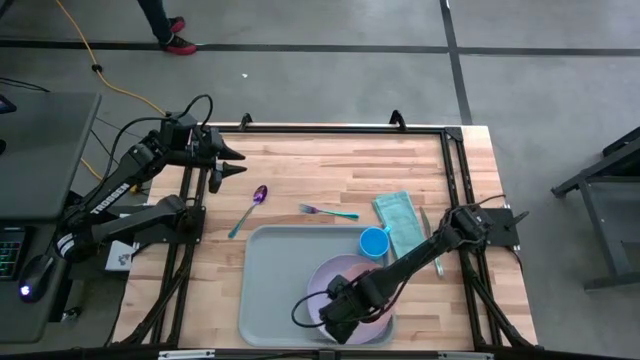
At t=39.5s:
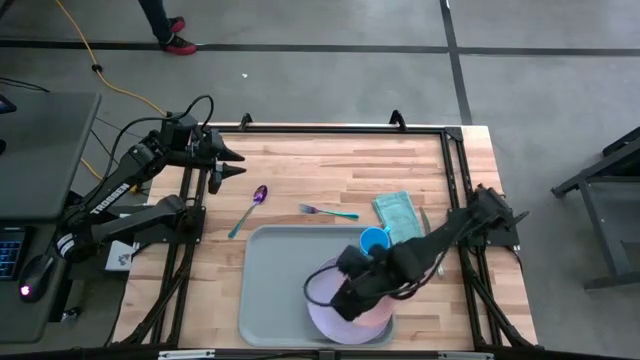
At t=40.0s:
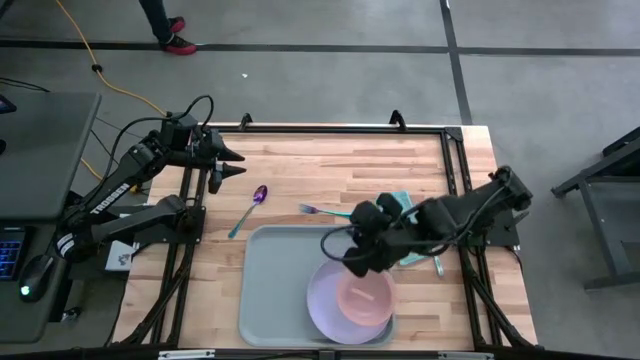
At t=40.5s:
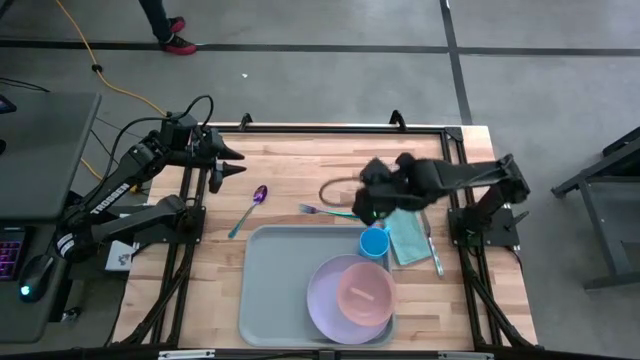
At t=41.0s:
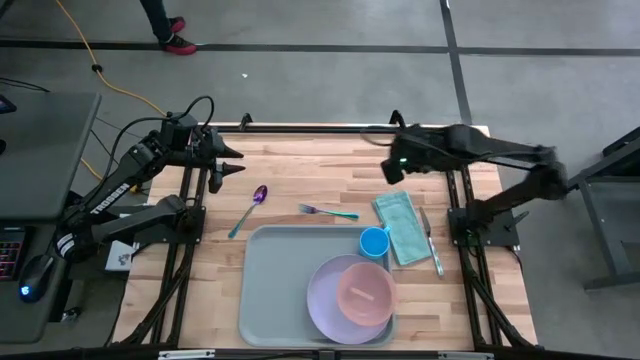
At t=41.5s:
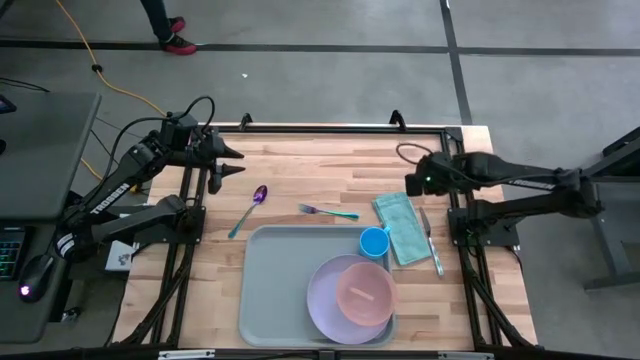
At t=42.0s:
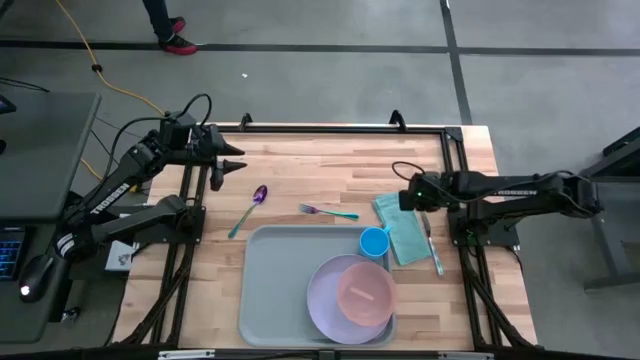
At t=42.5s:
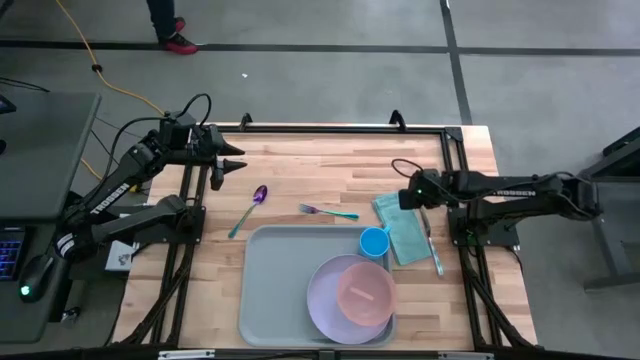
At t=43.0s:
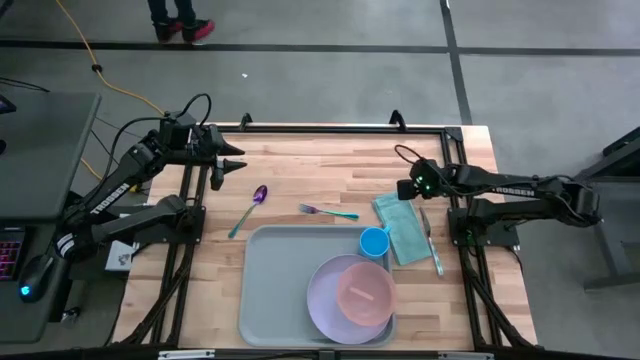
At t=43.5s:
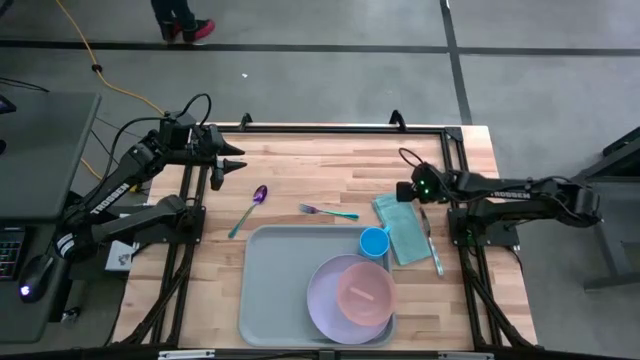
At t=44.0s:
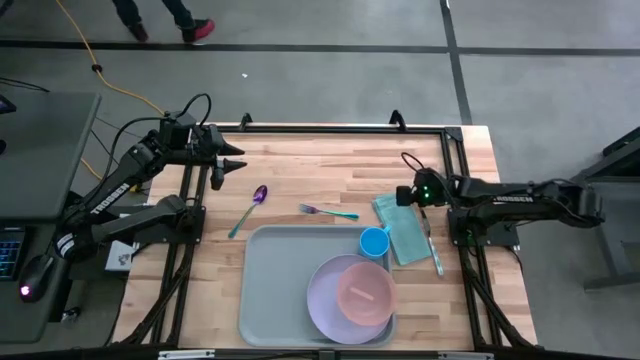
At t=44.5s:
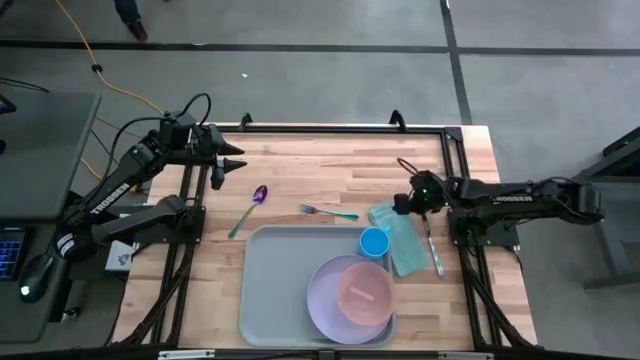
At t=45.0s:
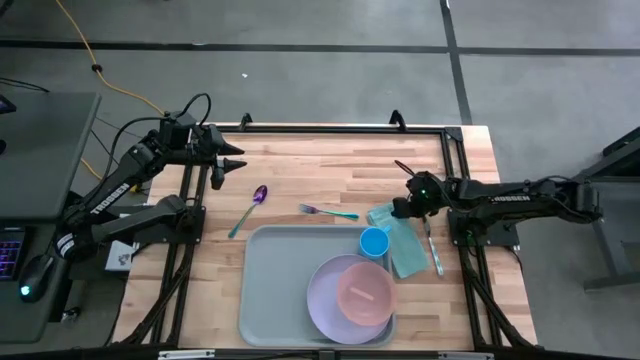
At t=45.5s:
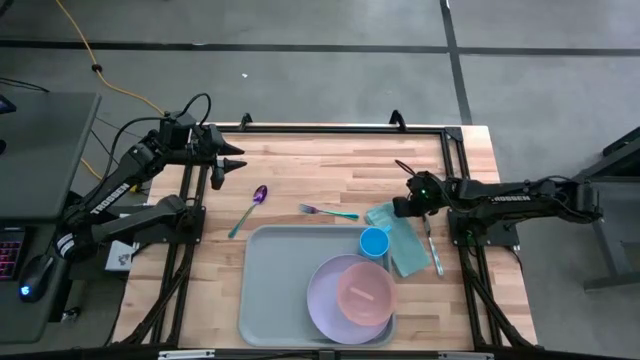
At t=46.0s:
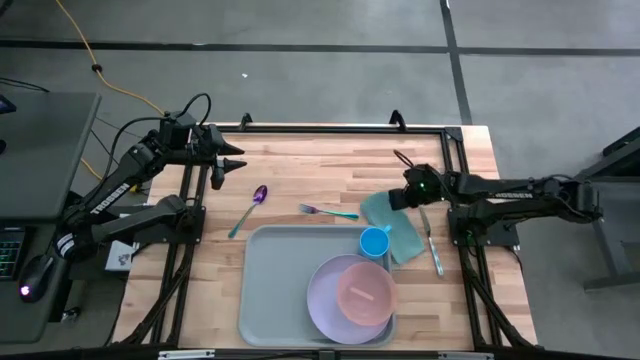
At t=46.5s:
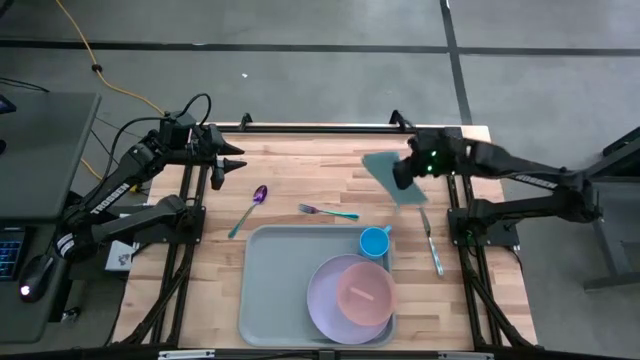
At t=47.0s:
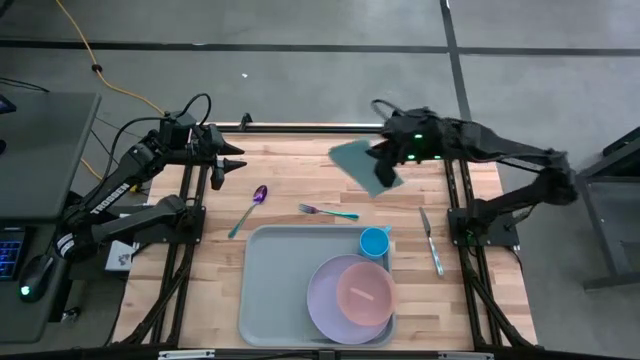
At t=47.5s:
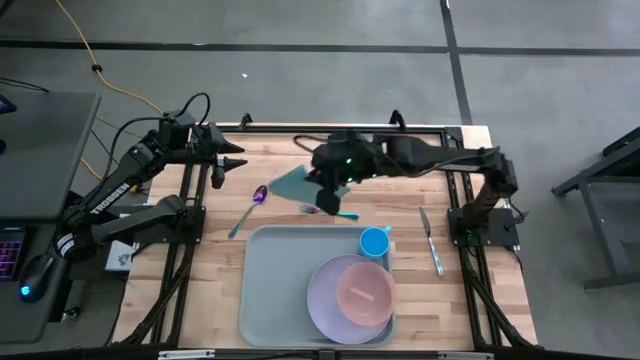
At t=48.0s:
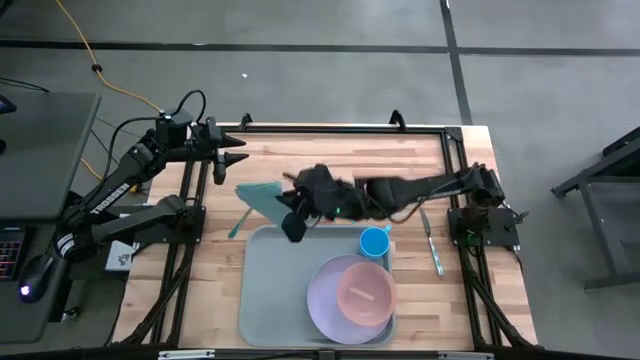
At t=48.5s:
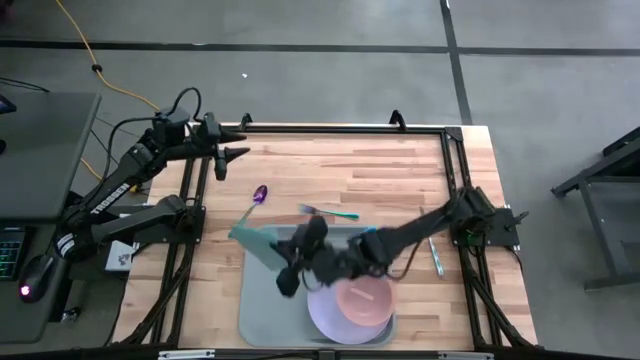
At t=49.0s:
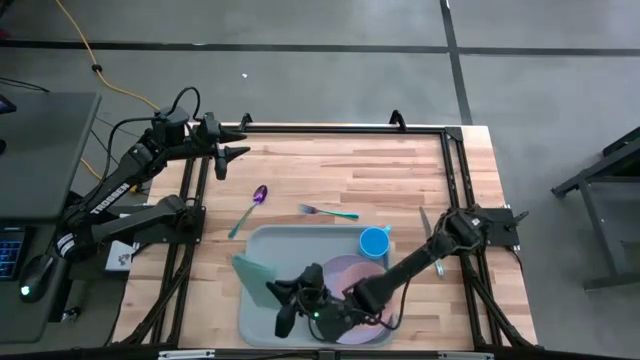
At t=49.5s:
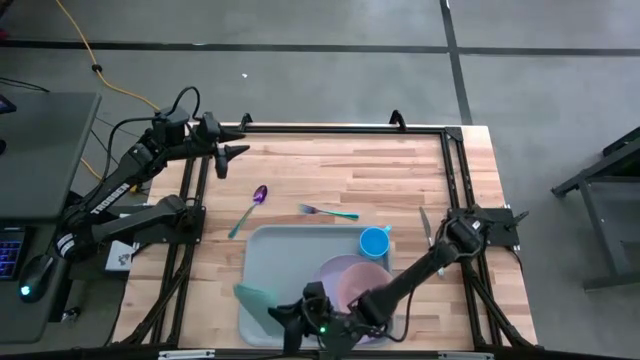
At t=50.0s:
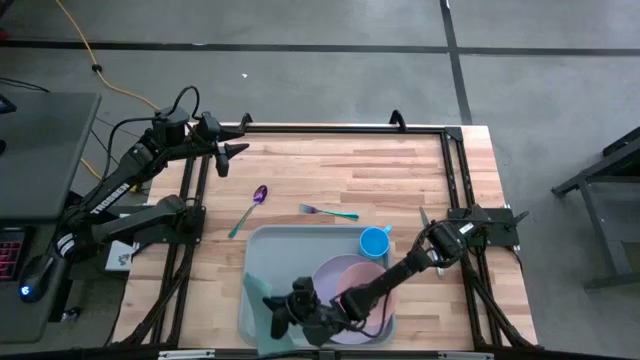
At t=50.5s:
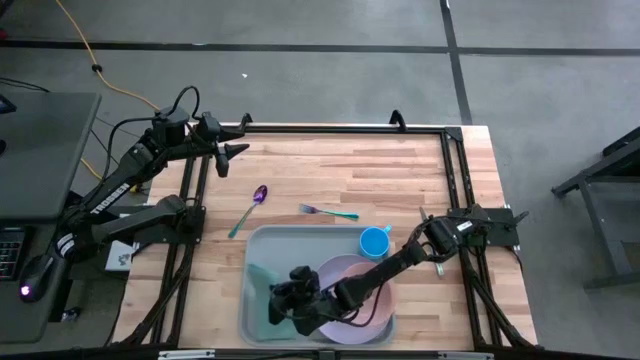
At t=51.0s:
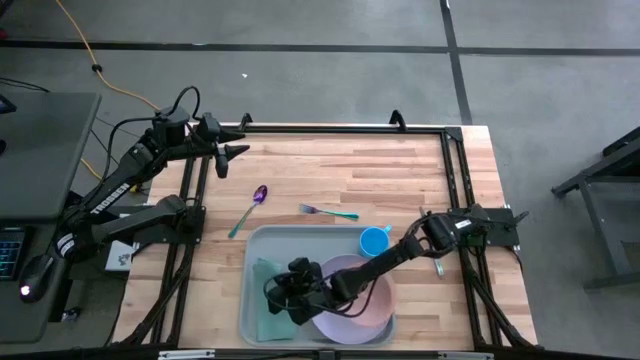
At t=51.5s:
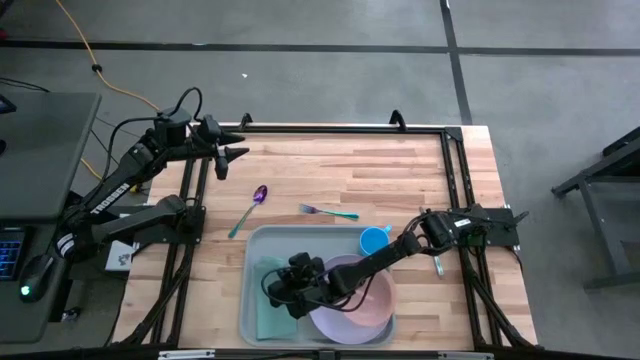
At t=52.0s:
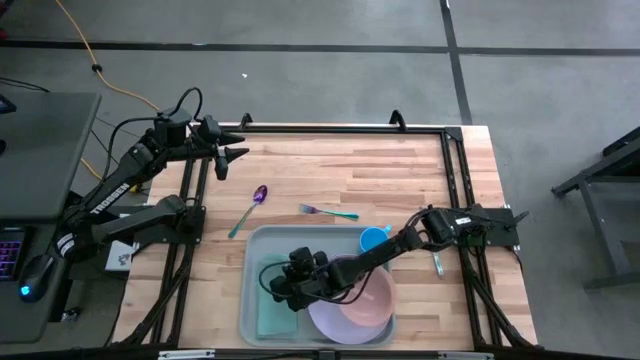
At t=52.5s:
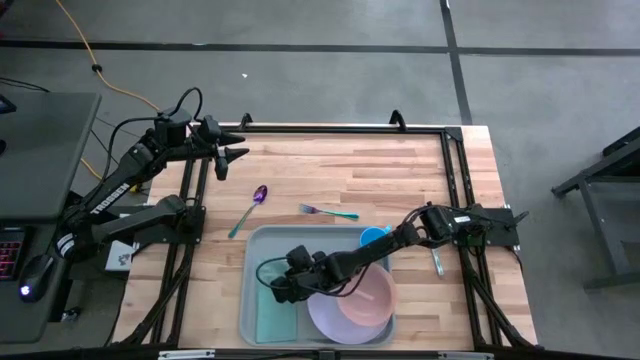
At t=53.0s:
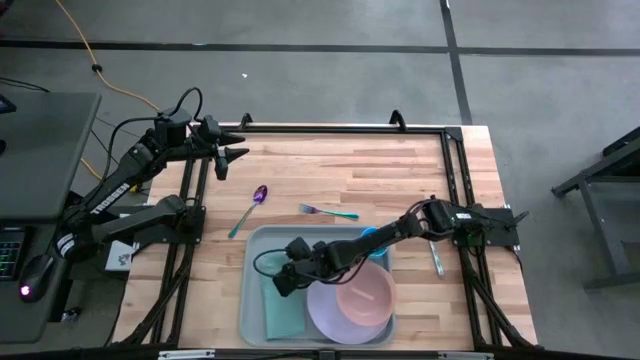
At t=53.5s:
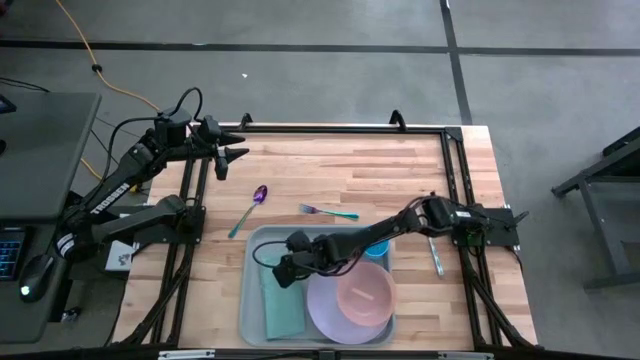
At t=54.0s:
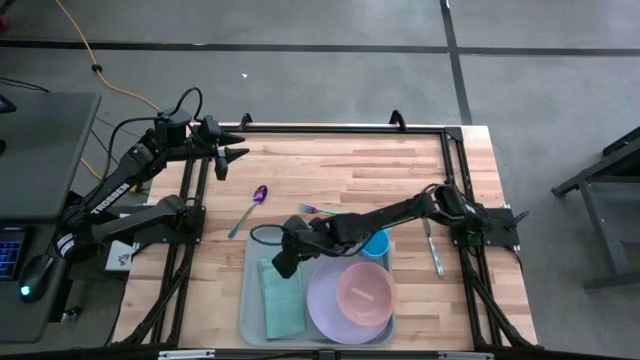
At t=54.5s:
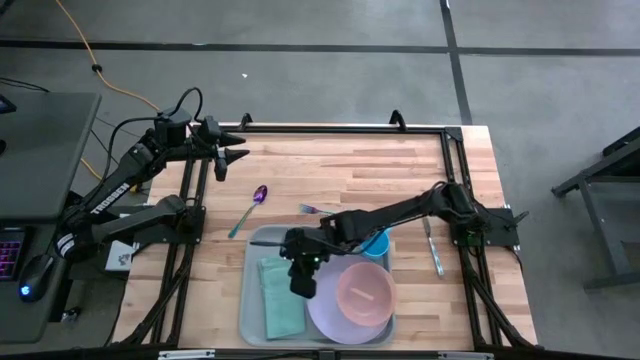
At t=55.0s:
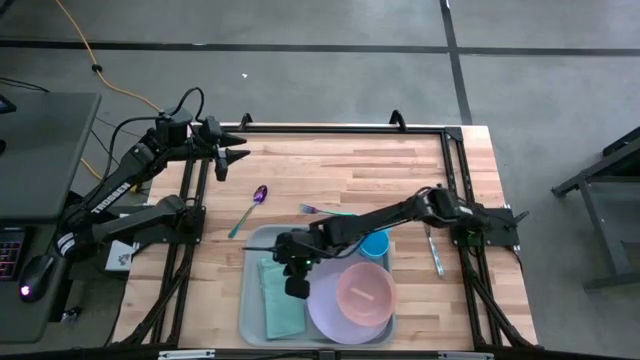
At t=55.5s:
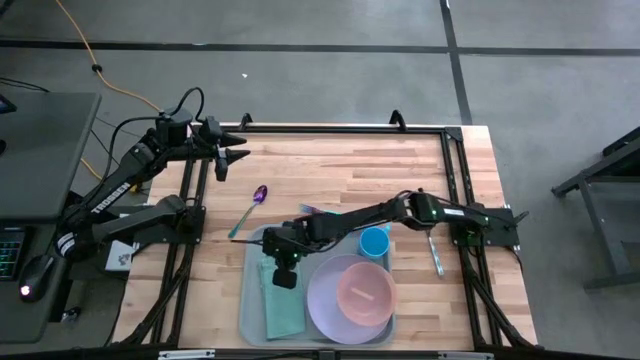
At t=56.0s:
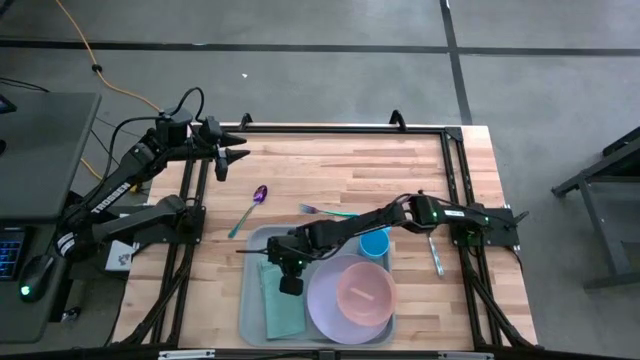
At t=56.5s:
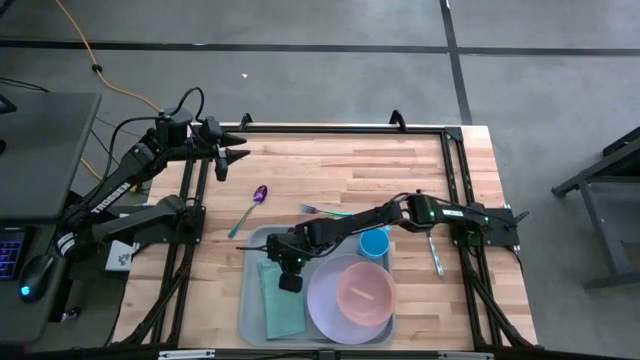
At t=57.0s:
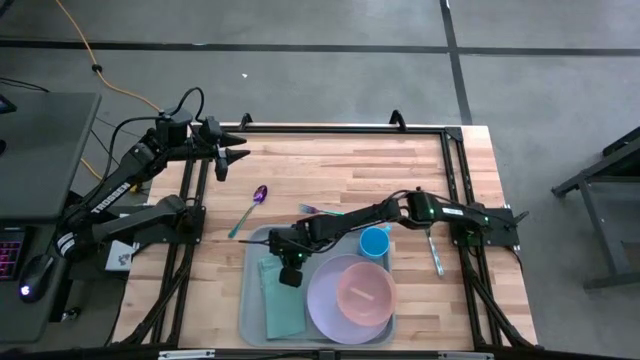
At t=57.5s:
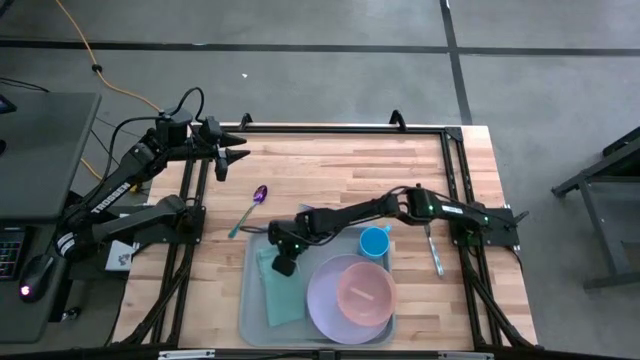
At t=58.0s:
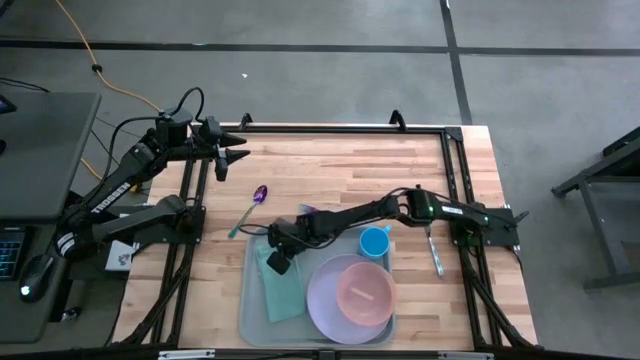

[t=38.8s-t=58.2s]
Task: Set up tray
Put the light blue napkin on the gray serving tray to the left of the violet plate

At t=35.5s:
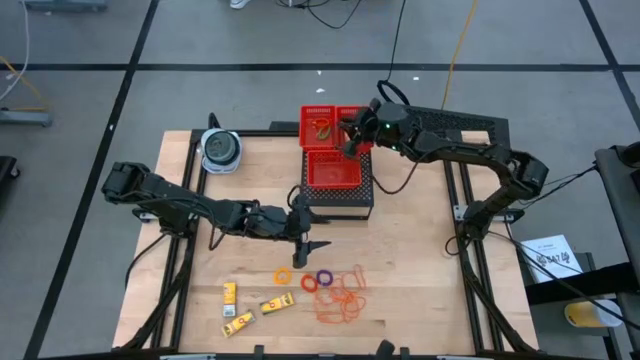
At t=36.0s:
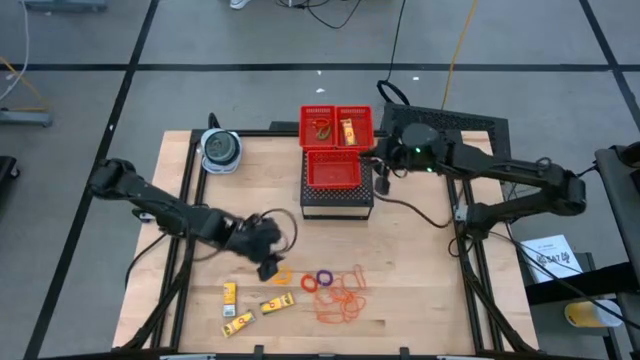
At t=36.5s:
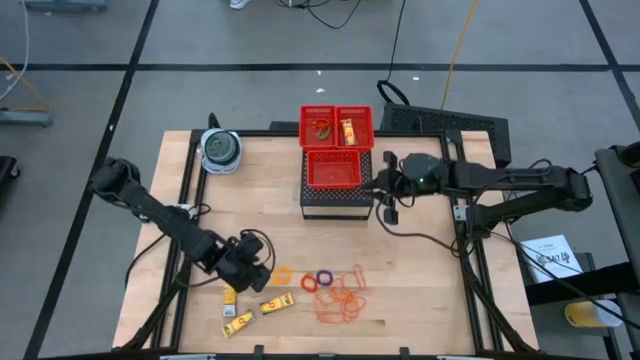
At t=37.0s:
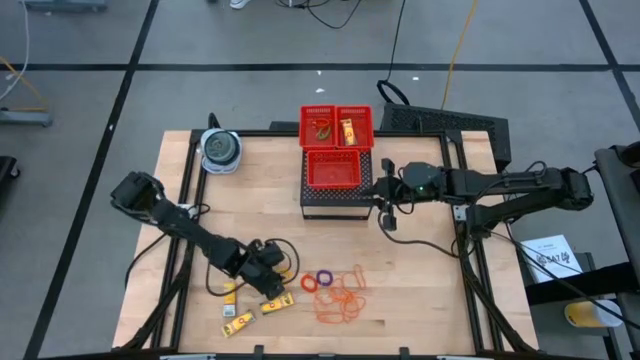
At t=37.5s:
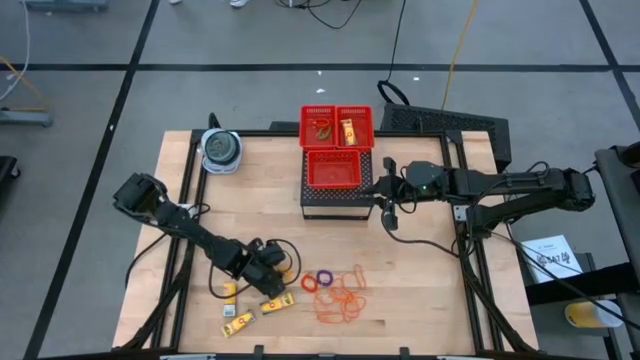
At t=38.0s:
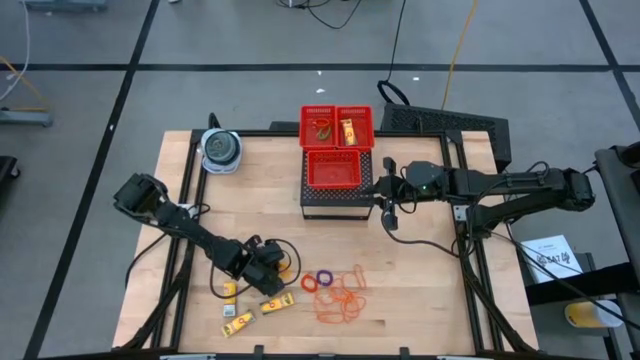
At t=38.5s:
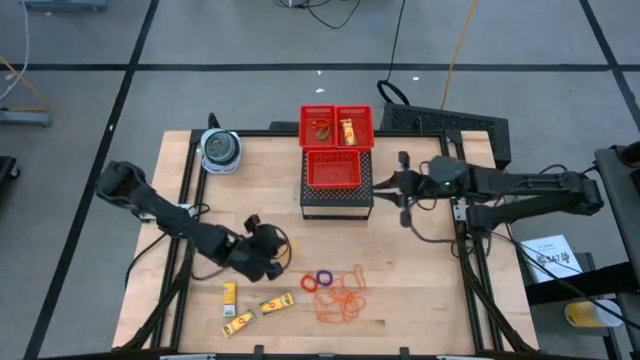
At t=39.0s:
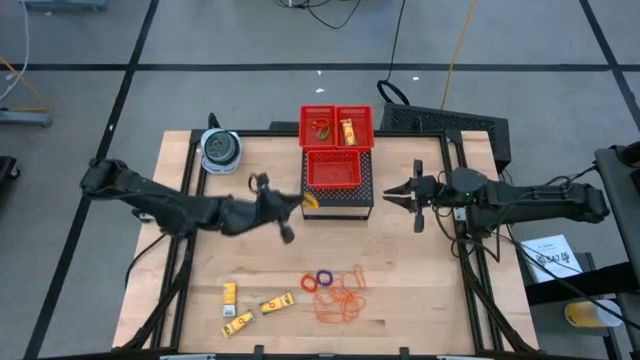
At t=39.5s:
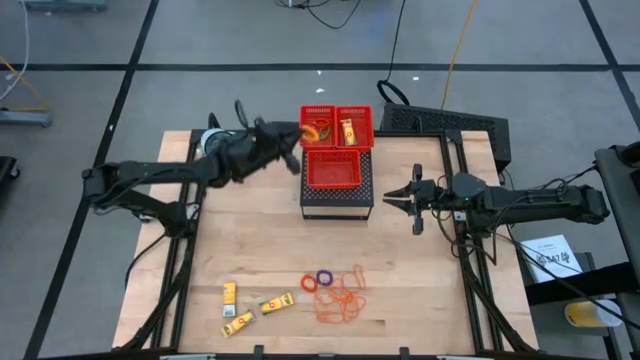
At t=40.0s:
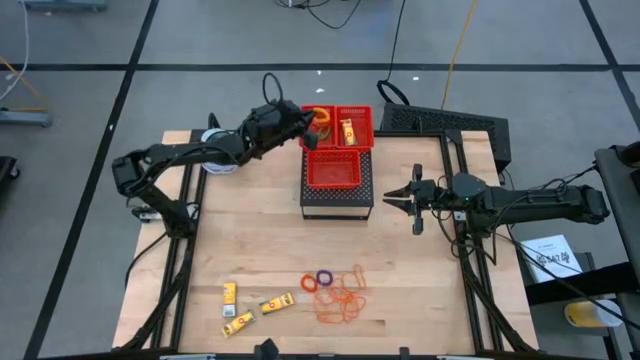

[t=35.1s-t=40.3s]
Task: Pick & Place Office Desk Supplies
Put the yellow spring keychain in the top left red bin on the shelf
